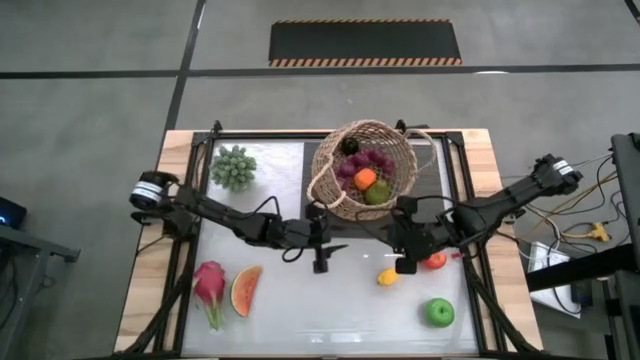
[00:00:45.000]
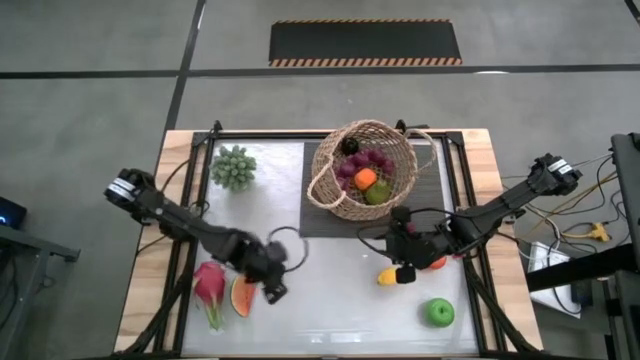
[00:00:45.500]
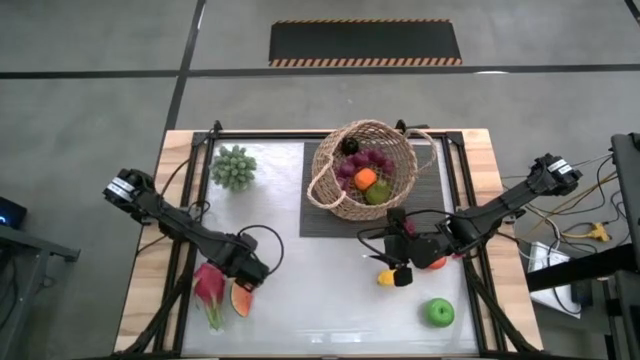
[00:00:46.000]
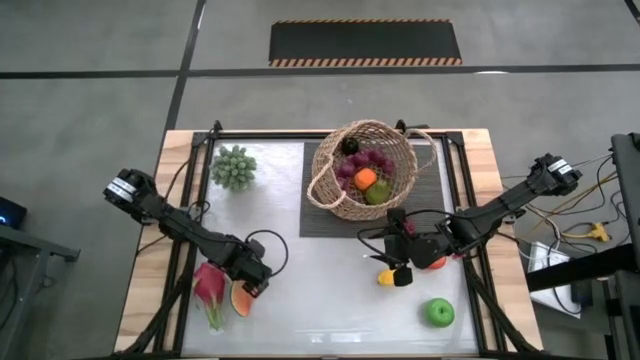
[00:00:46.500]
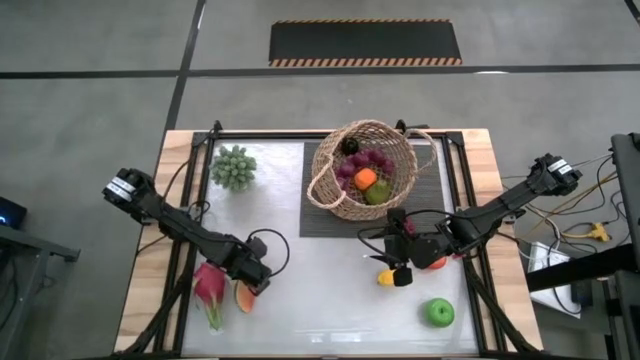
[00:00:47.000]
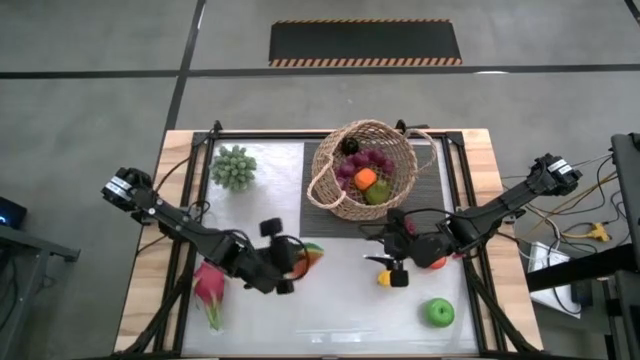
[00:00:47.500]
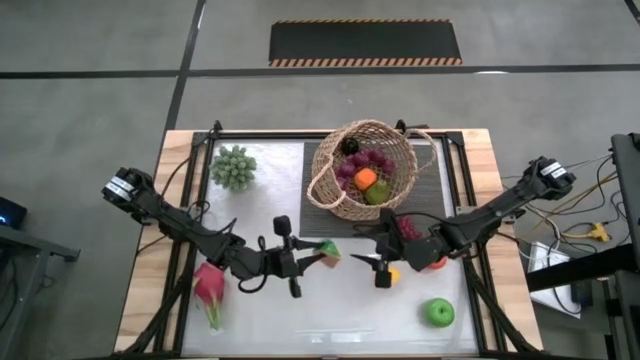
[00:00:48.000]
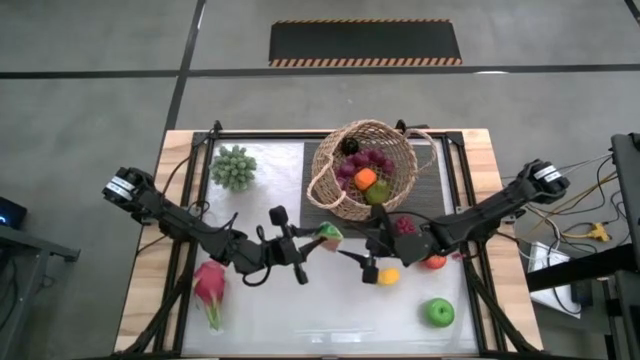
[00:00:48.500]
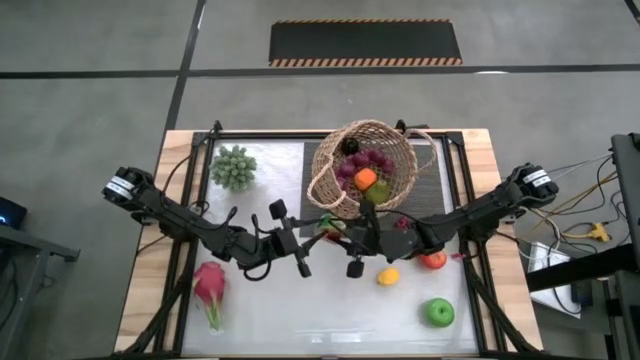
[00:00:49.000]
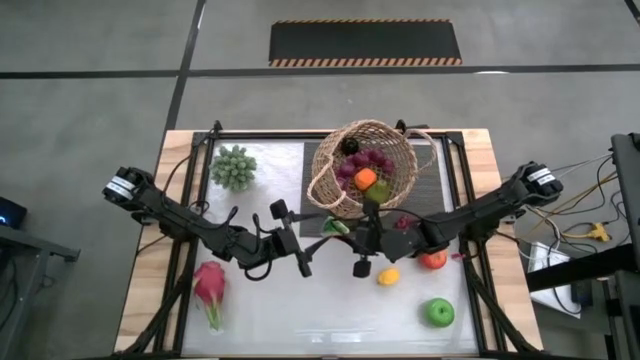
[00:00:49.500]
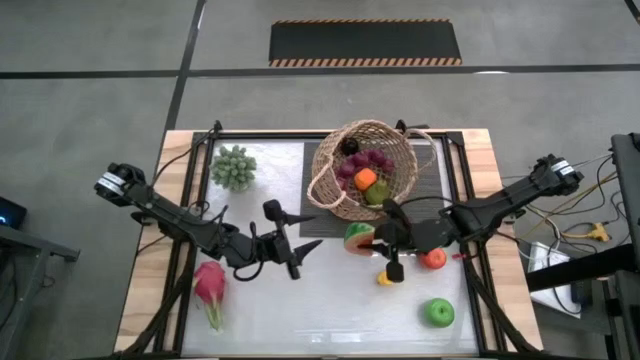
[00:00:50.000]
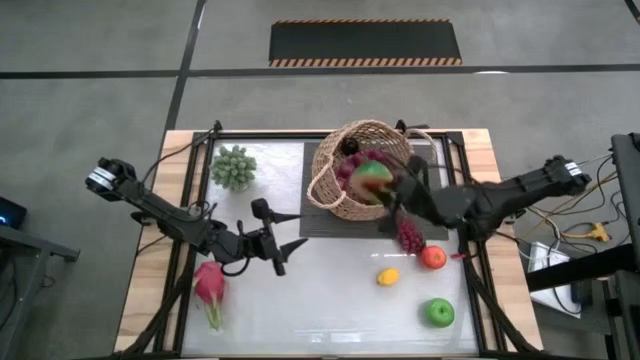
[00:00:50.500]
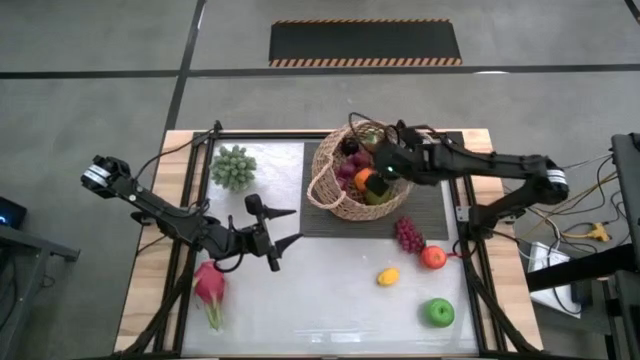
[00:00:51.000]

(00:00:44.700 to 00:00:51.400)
Task: Build produce basket
Put the watermelon into the brown basket

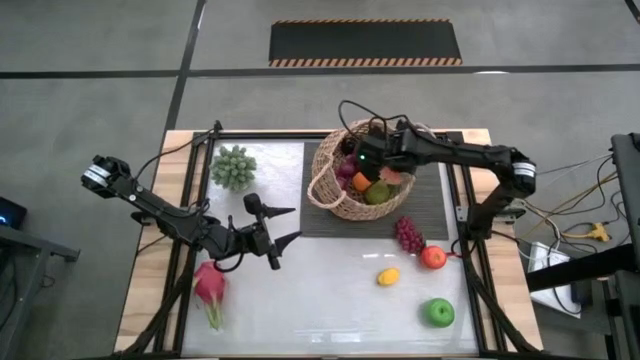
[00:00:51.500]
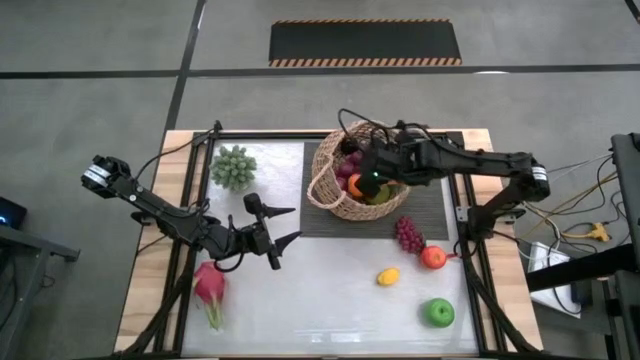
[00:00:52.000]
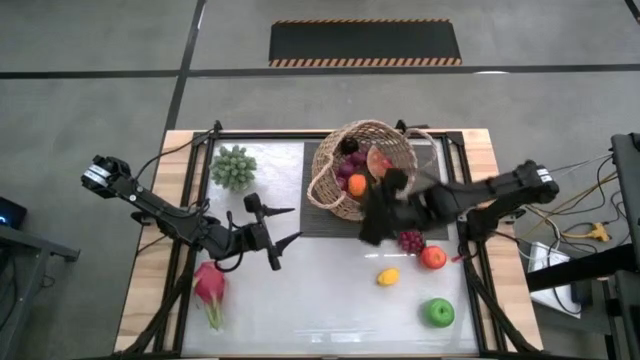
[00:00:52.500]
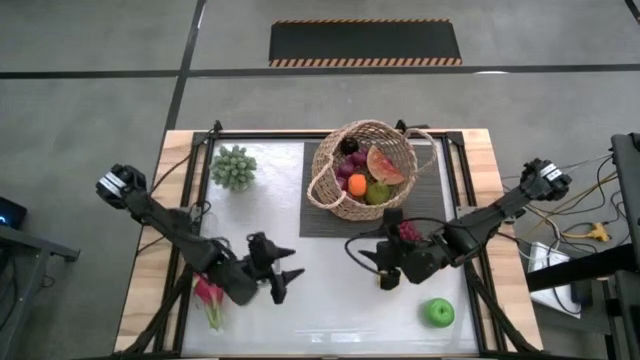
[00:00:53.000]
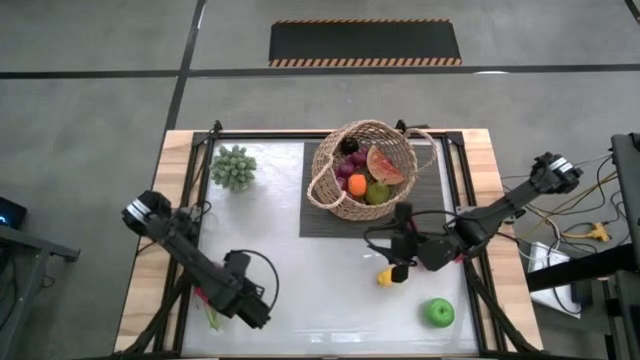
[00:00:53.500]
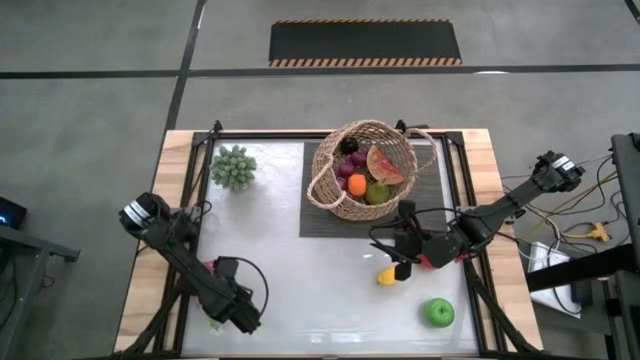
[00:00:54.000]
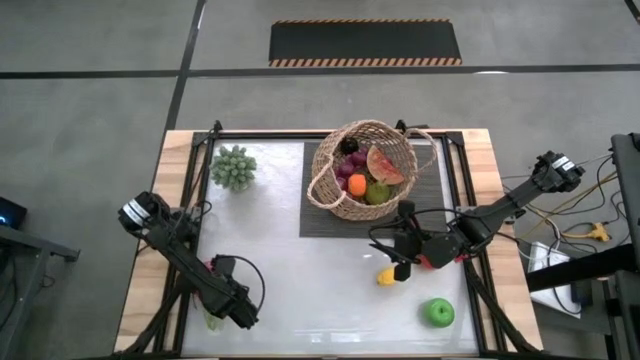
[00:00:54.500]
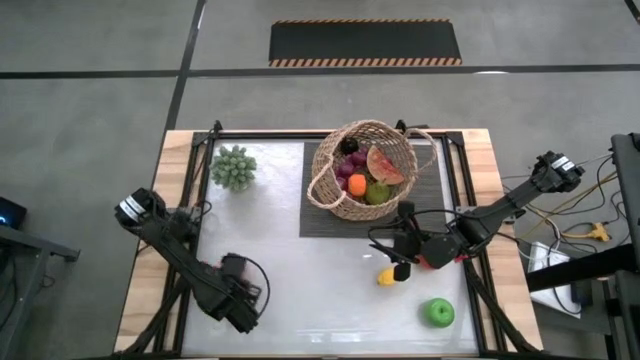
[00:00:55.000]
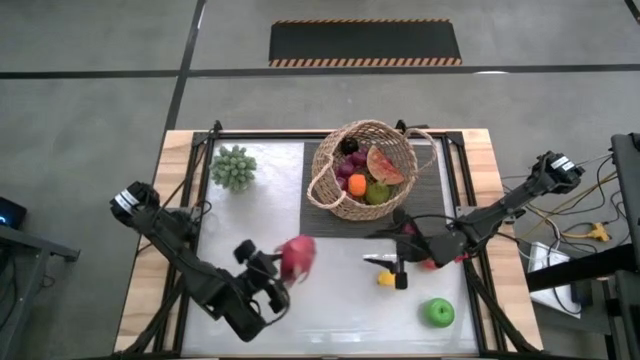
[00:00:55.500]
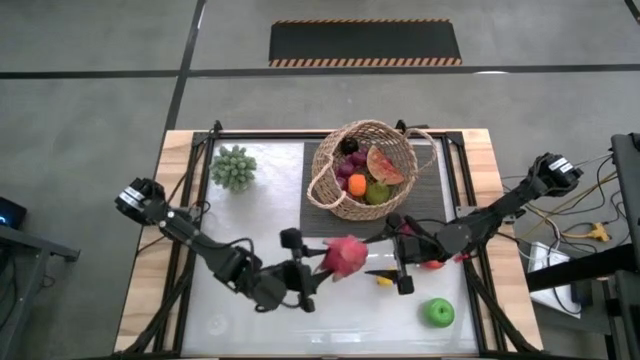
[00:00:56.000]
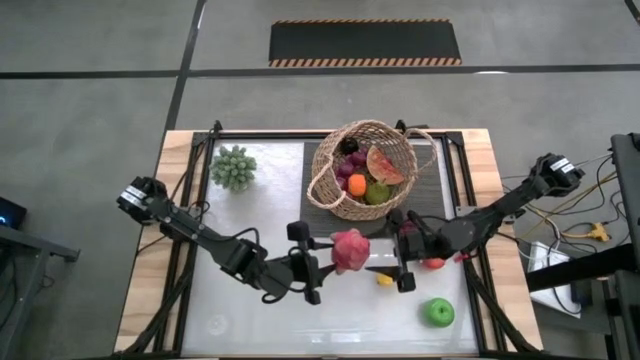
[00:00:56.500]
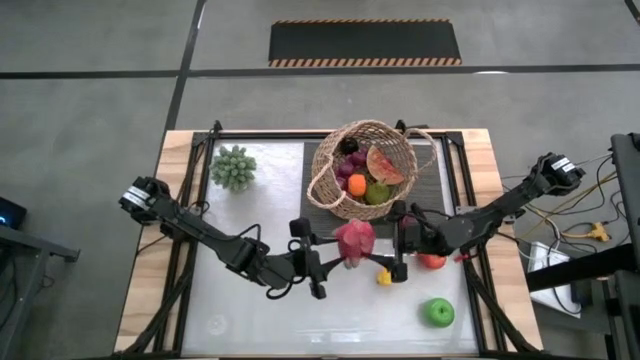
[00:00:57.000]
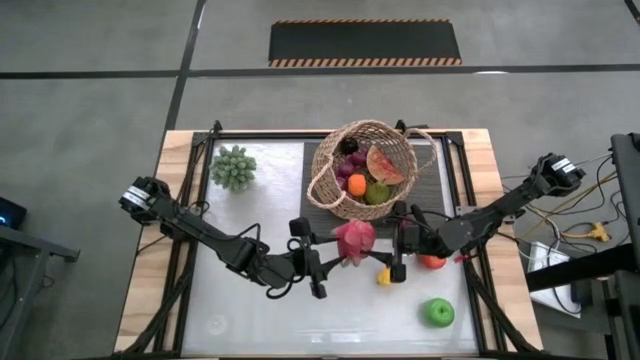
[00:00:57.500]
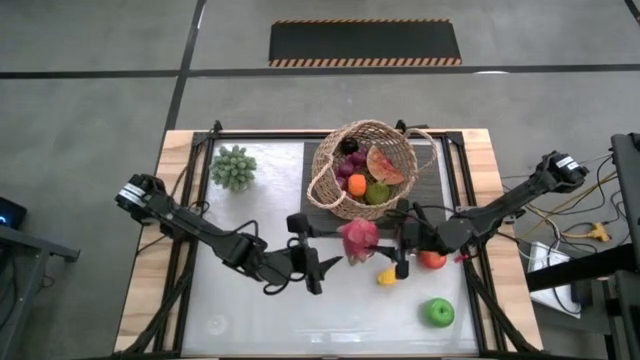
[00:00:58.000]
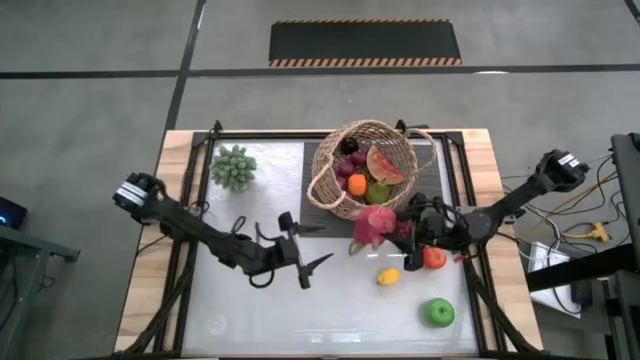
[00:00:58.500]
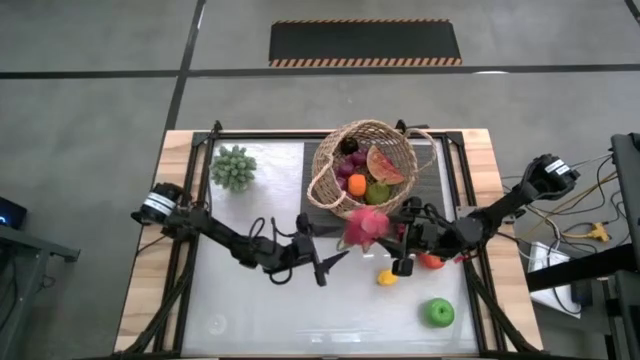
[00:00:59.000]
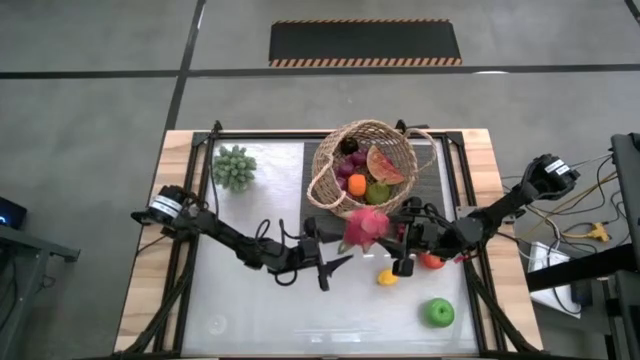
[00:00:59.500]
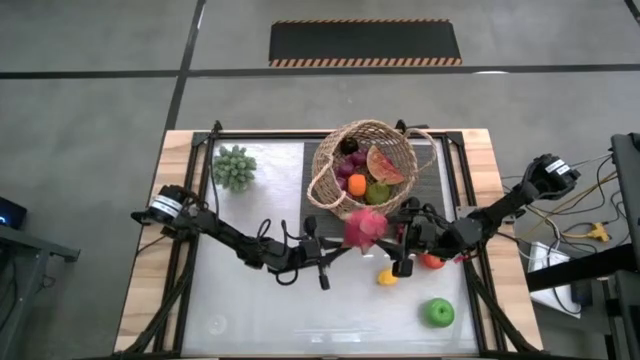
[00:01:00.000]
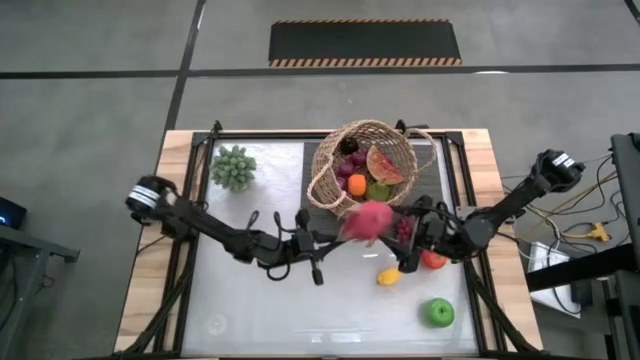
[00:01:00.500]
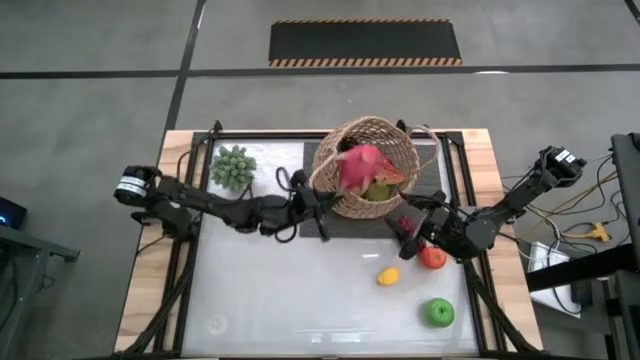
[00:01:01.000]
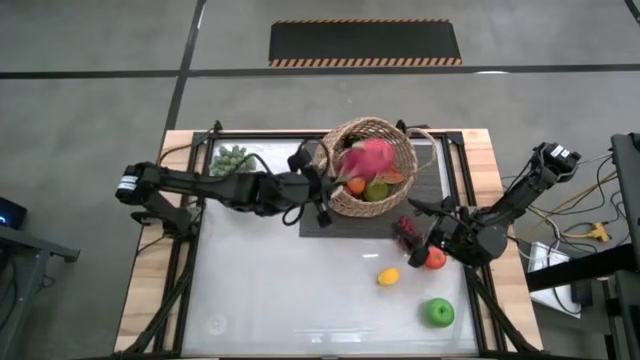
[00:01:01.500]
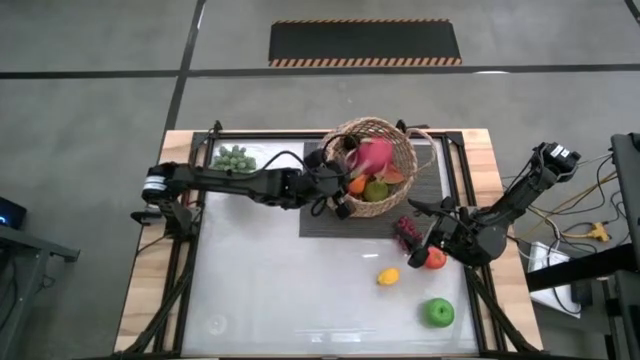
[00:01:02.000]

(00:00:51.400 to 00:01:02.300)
Put the dragonfruit into the brown basket

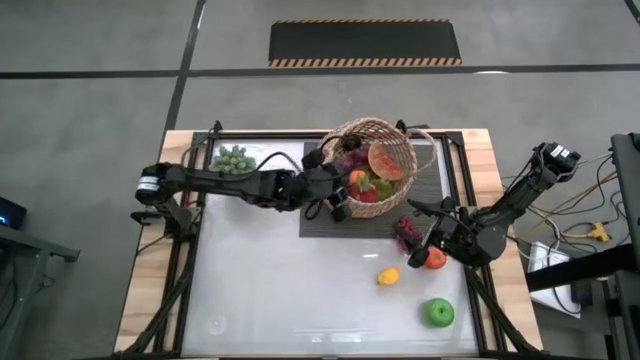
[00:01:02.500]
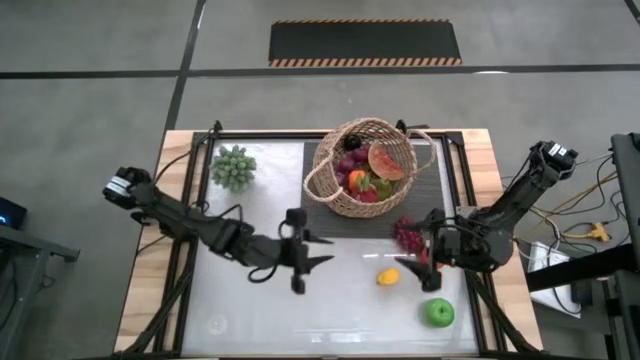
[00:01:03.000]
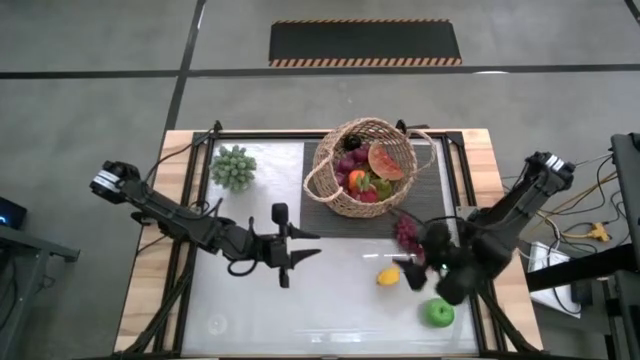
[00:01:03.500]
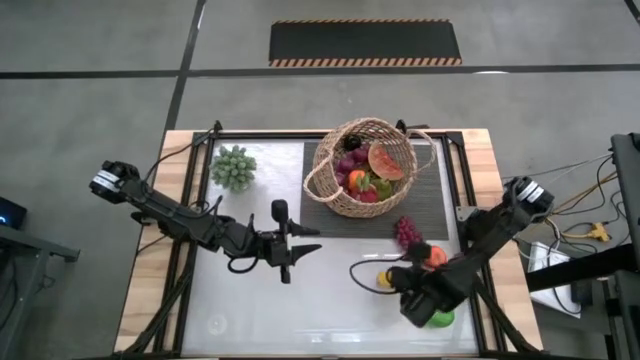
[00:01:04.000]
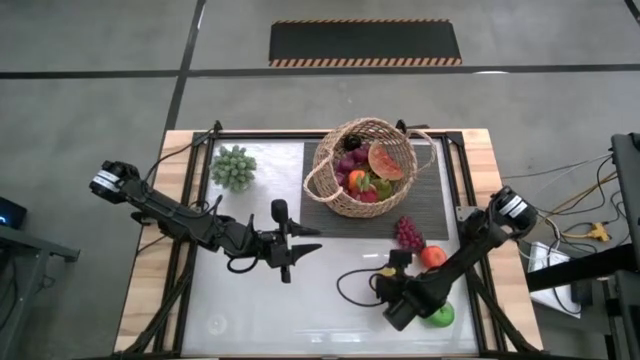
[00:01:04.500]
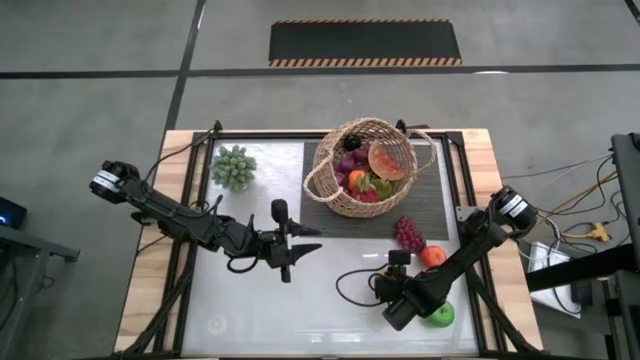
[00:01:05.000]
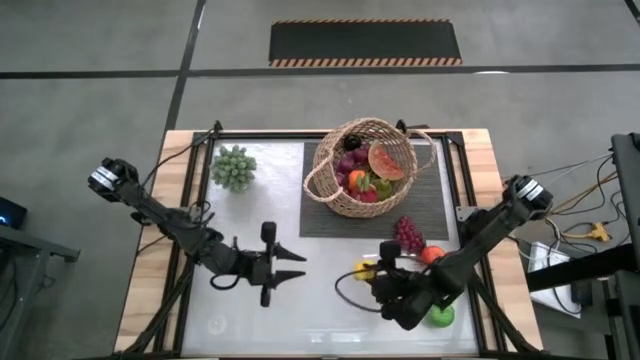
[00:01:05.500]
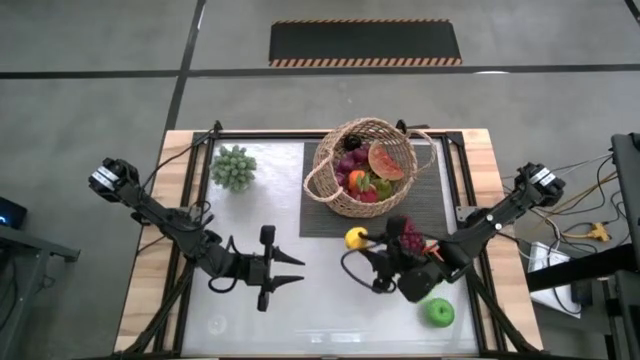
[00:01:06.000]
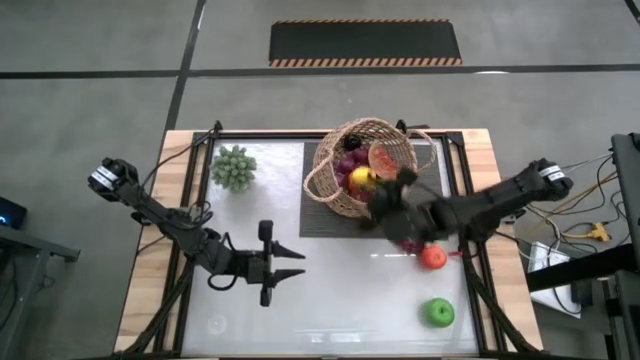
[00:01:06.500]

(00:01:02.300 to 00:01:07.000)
Put the lemon into the brown basket
